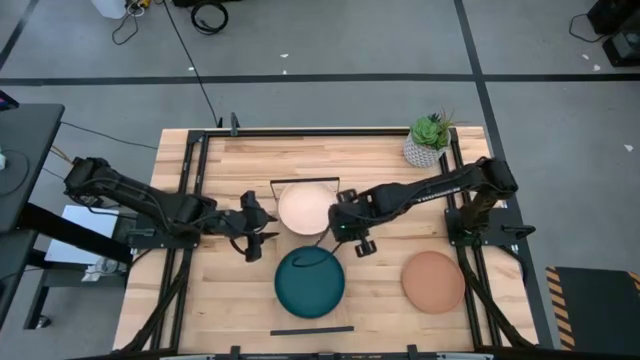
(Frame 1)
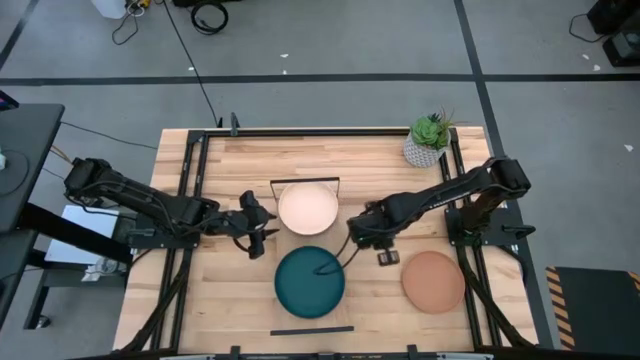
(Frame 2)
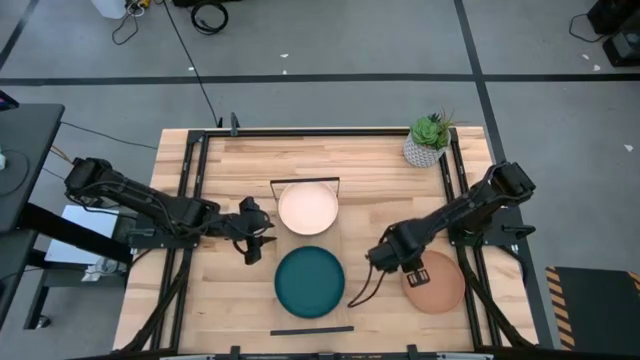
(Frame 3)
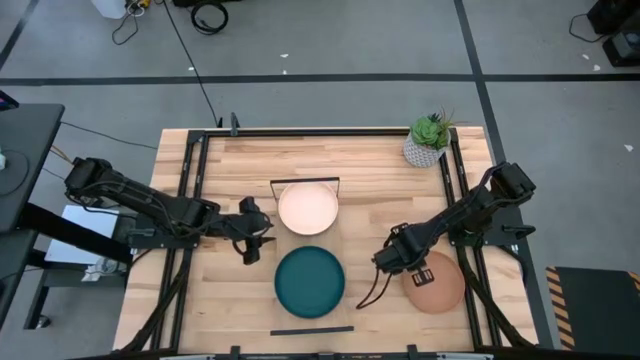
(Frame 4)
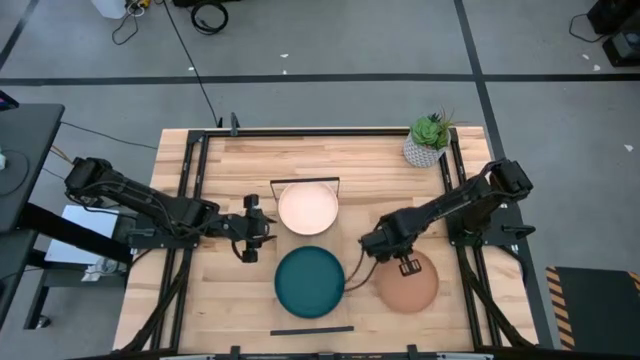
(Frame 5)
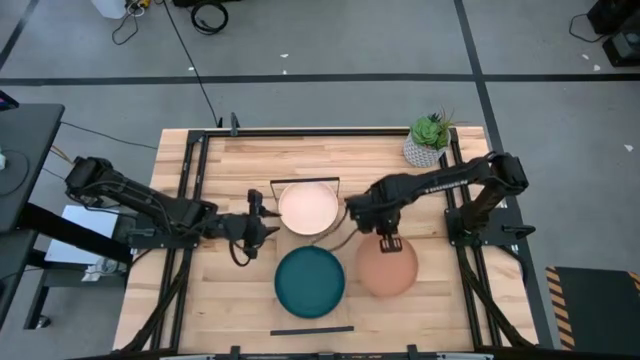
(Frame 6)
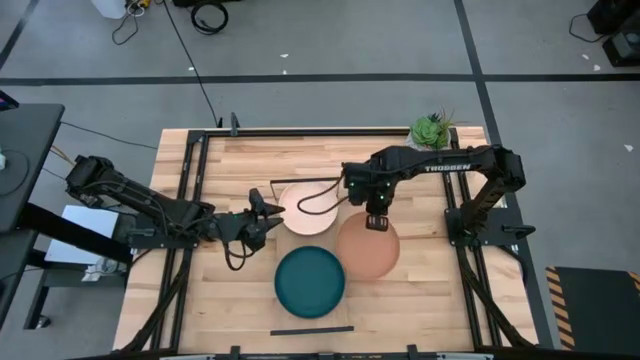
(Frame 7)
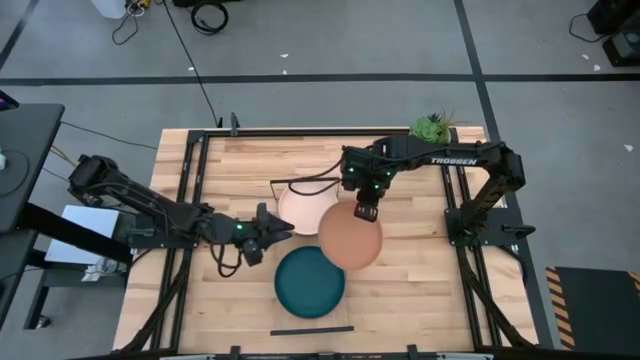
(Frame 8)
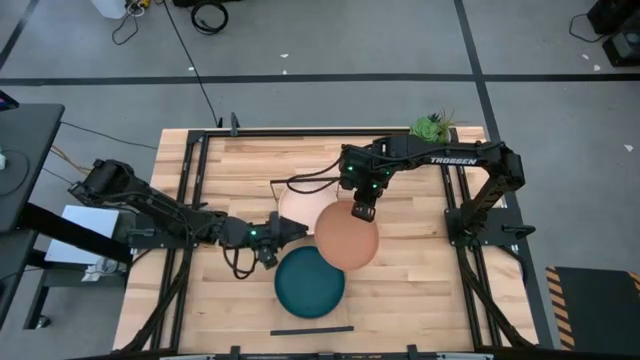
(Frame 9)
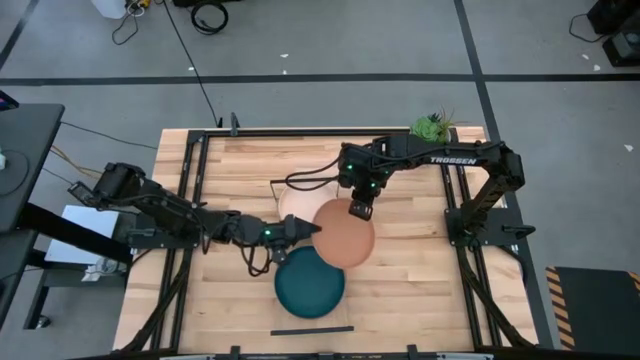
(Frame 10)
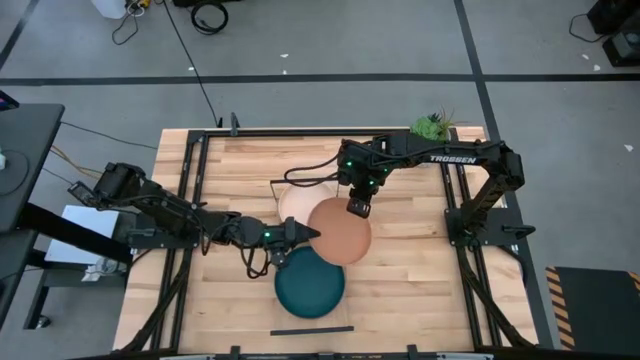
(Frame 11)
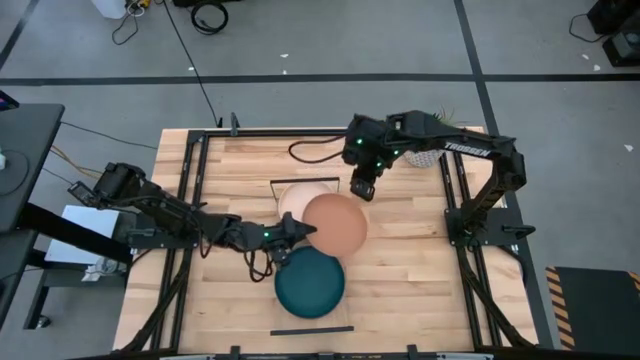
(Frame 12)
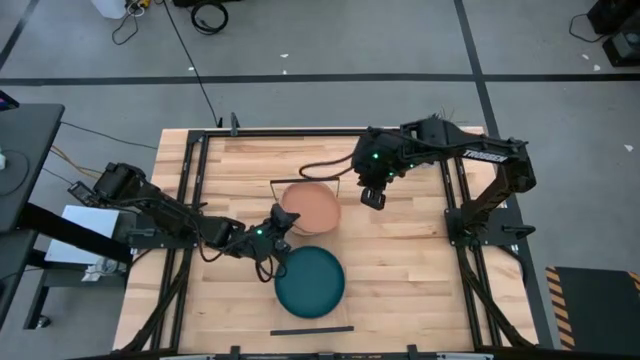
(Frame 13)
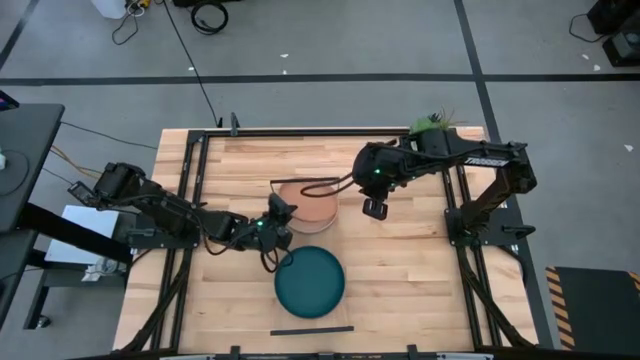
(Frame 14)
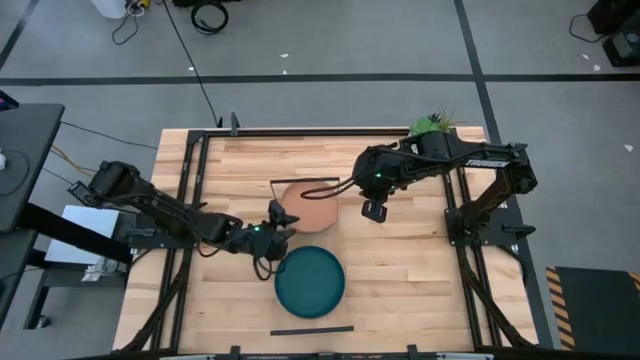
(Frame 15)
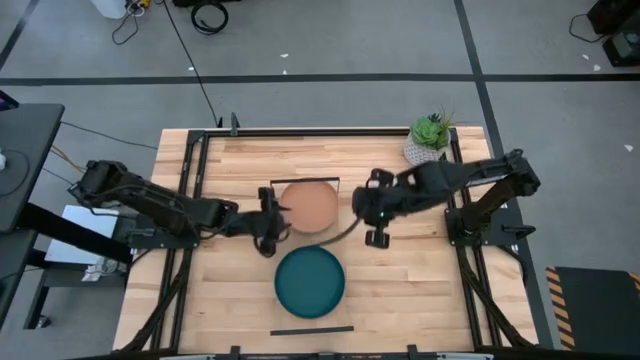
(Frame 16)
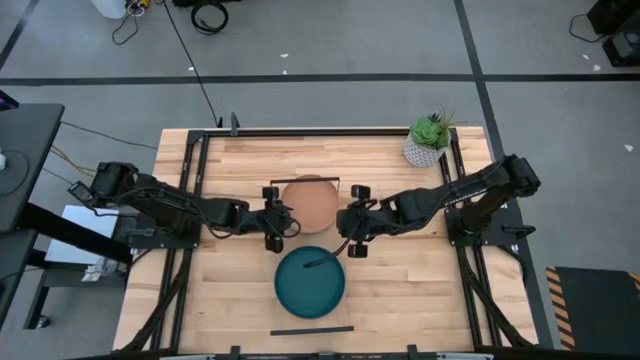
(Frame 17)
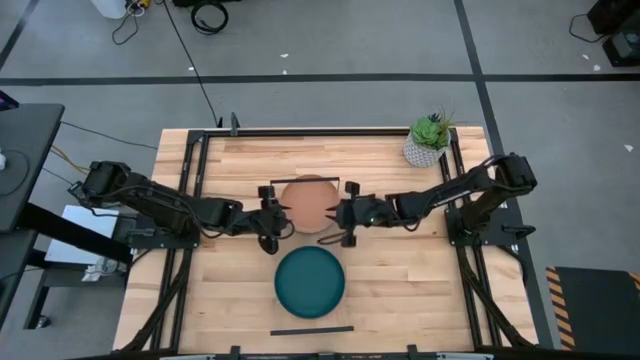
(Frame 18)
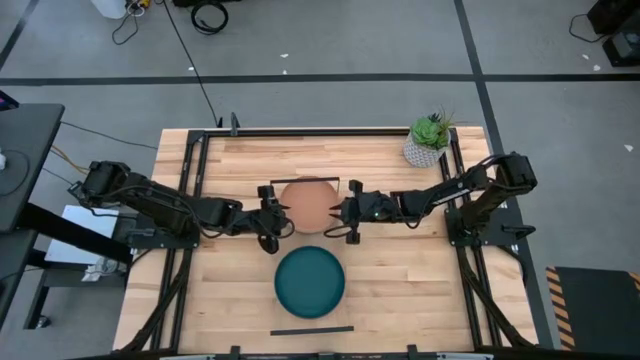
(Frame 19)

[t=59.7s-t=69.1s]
Task: Place and stack plates onto a shelf
Stack the brown plate on top of the light orange plate on the shelf

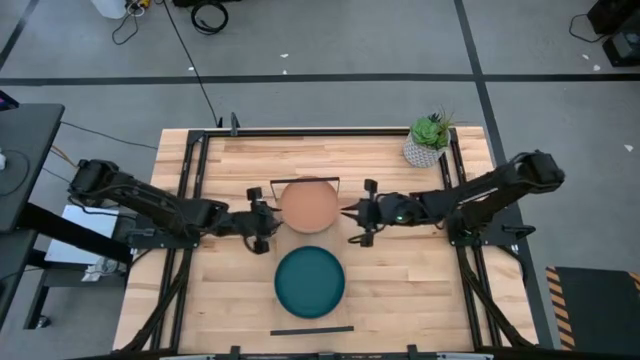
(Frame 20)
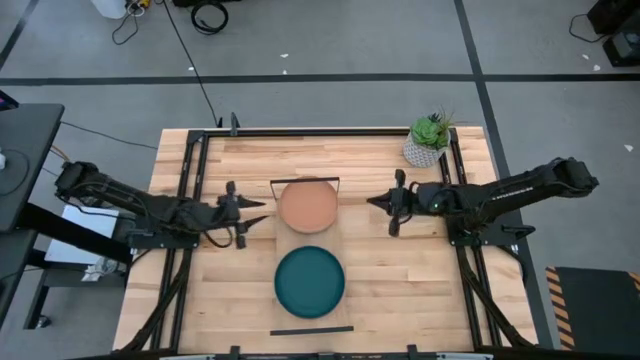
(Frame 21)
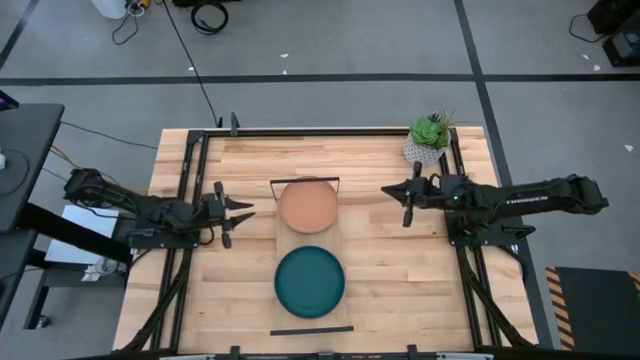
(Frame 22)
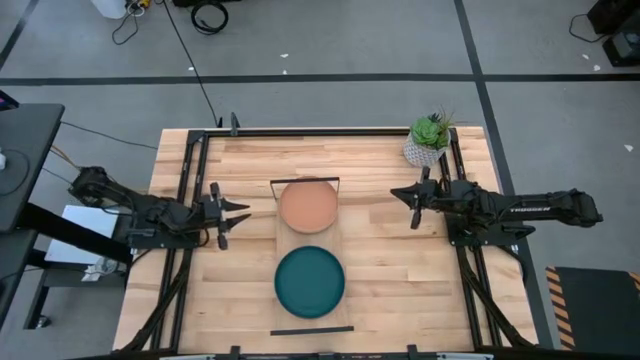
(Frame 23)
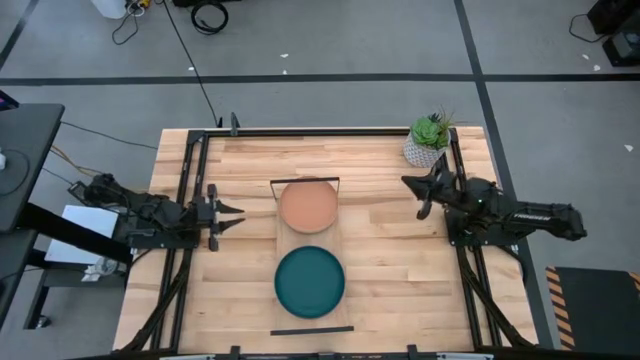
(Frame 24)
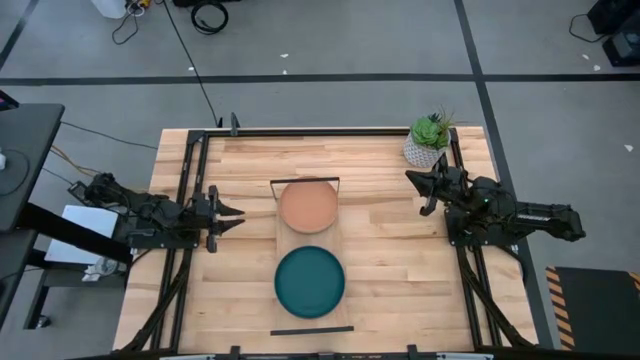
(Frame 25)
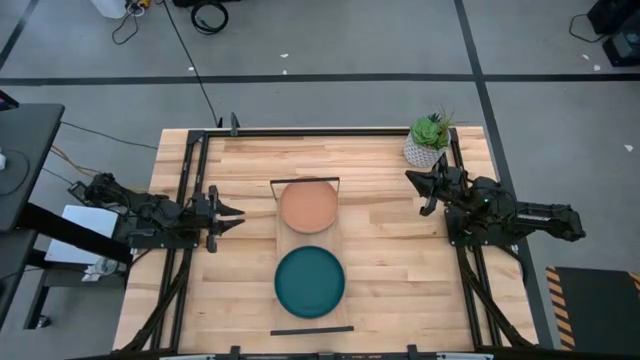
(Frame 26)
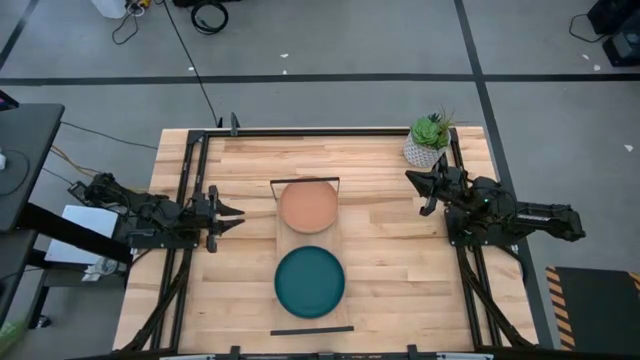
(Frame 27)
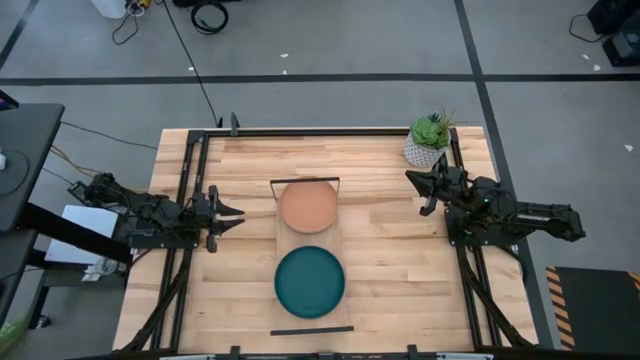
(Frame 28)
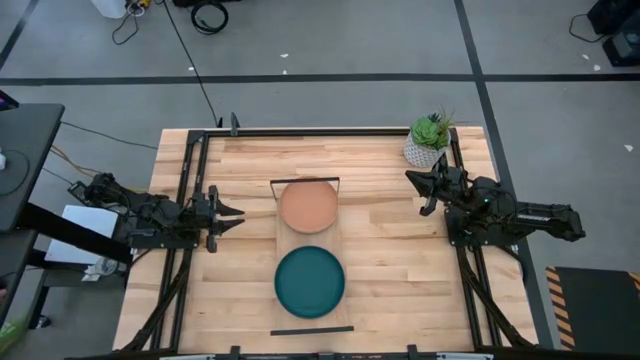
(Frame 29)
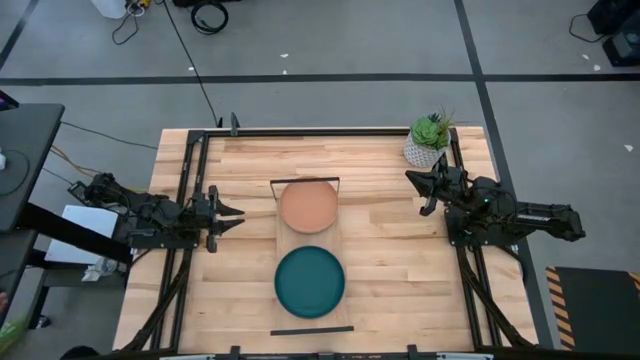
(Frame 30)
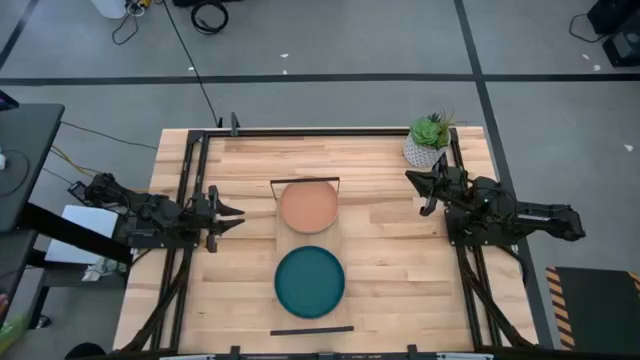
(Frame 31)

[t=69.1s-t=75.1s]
Return to Home Position

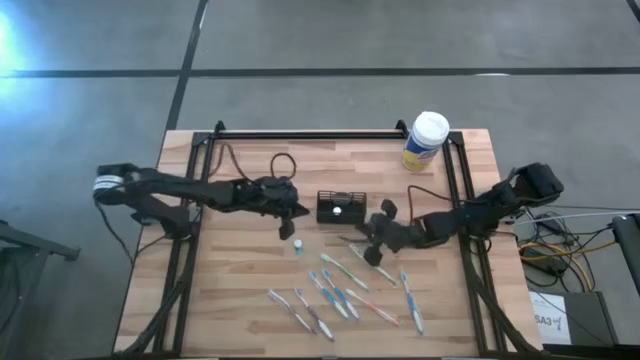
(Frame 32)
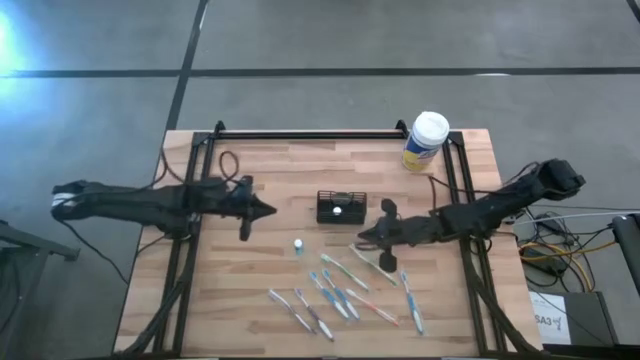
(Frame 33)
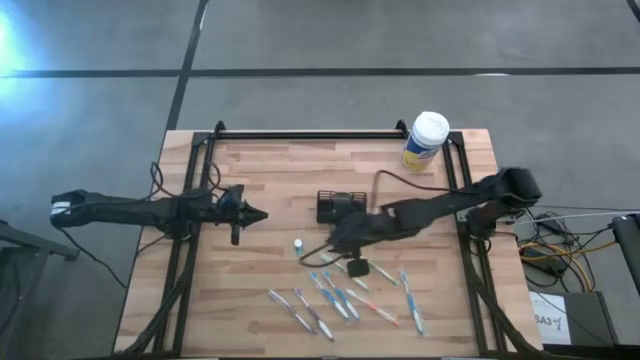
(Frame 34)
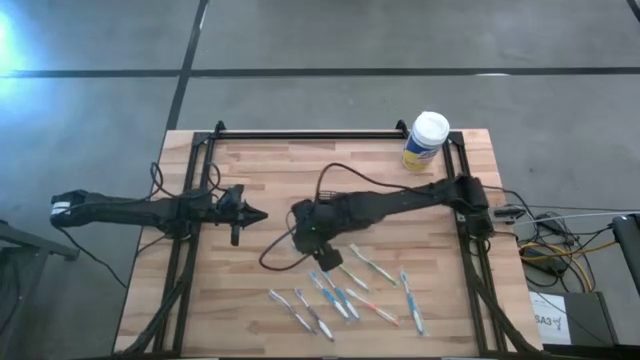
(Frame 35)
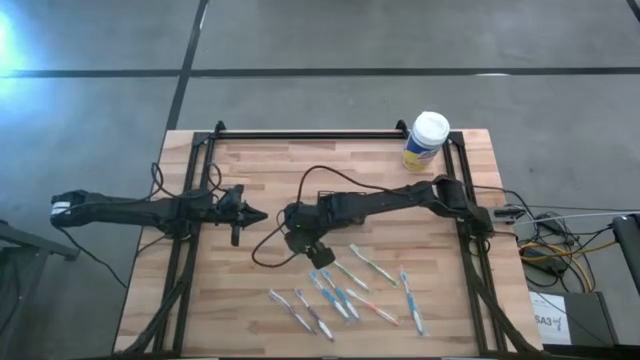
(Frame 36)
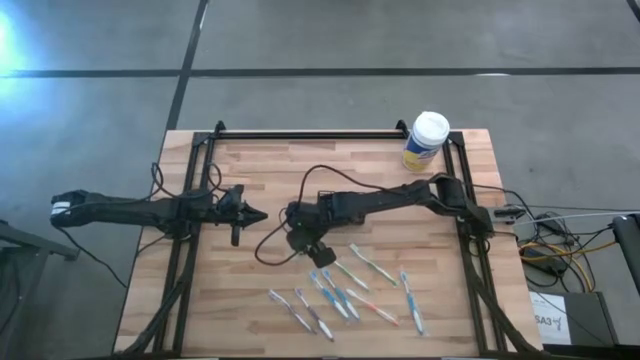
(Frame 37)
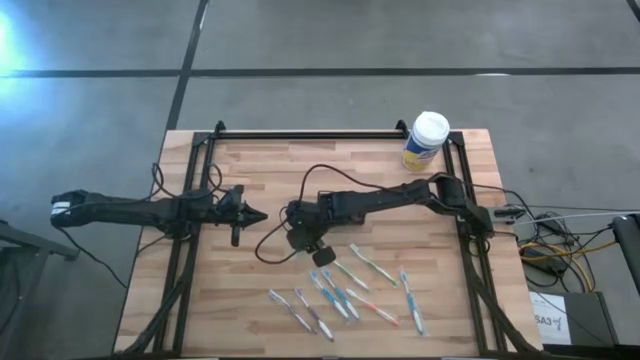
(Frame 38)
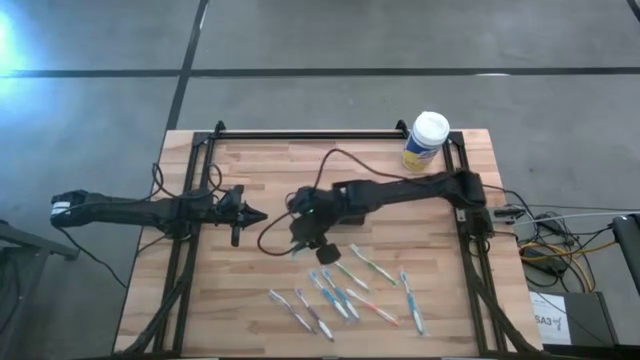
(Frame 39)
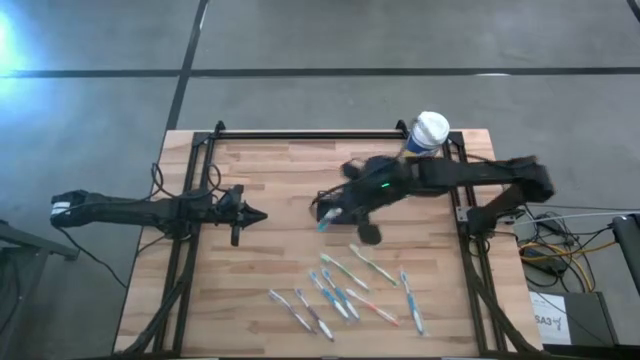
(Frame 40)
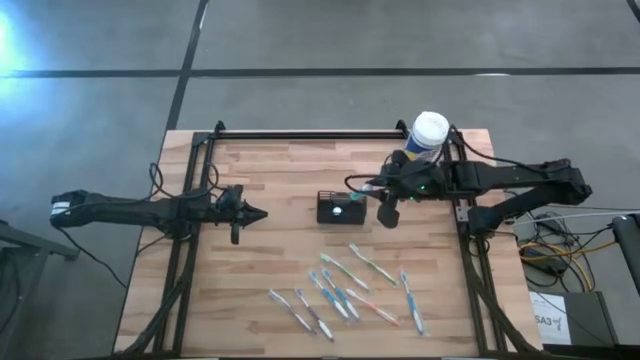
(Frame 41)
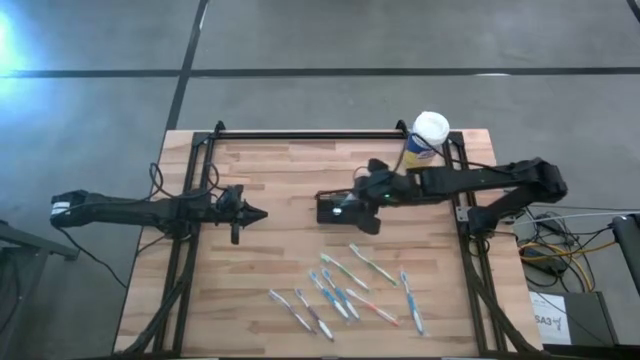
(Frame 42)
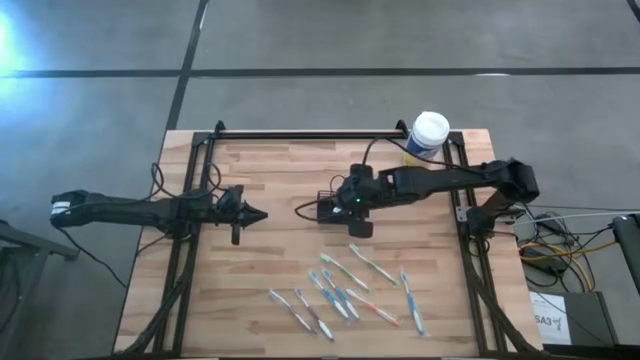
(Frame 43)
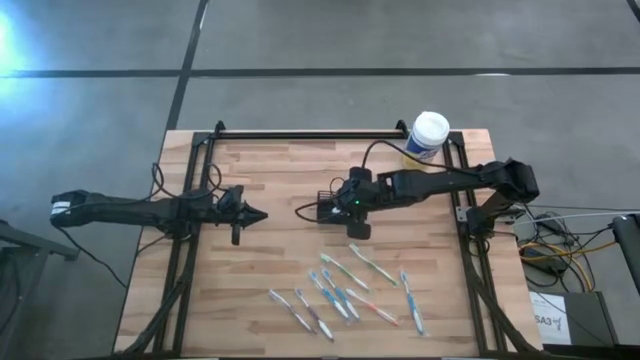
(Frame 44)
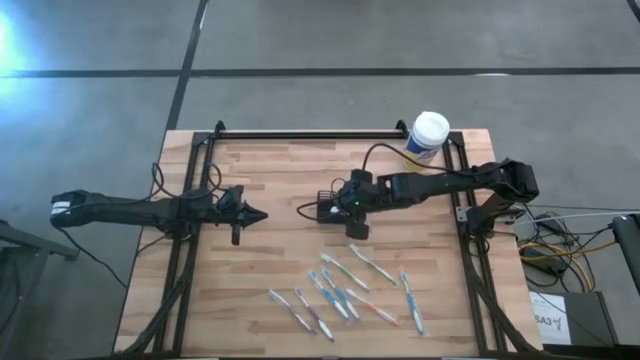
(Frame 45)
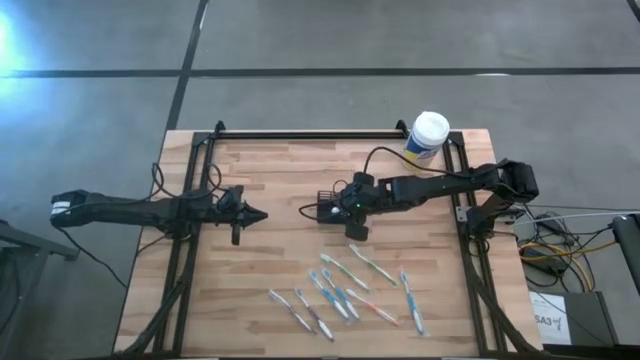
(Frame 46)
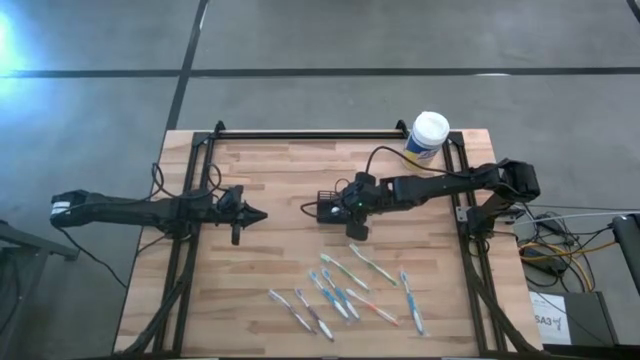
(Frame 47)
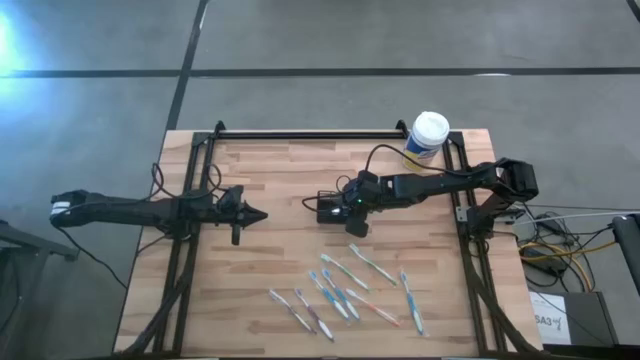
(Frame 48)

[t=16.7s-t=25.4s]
Task: Pick & Place toothbrushing station
Put the mouthwash bottle into the wire organizer
